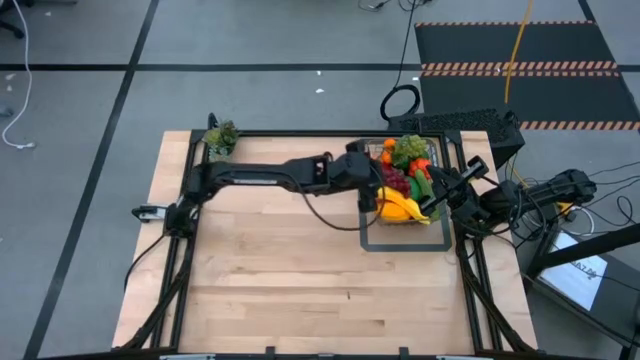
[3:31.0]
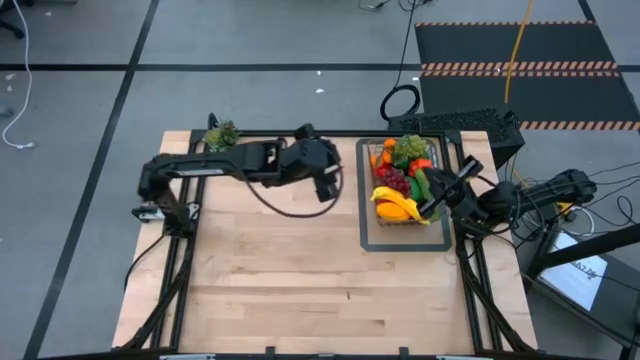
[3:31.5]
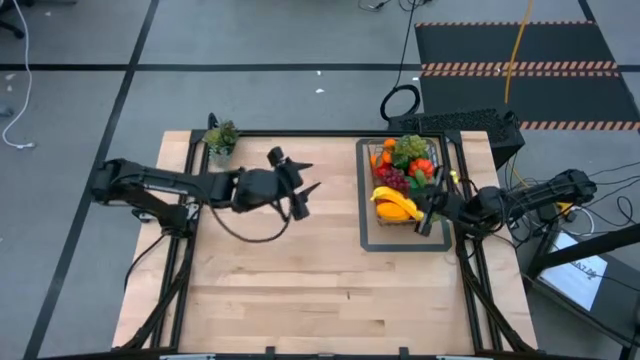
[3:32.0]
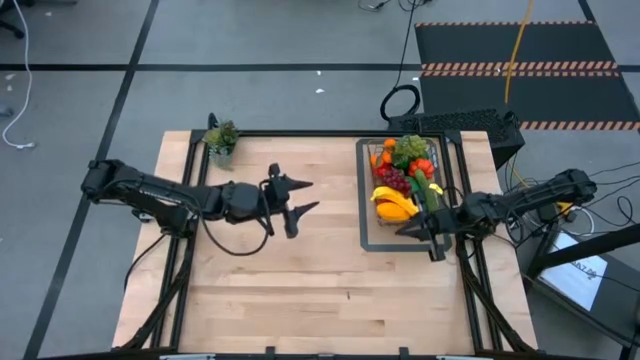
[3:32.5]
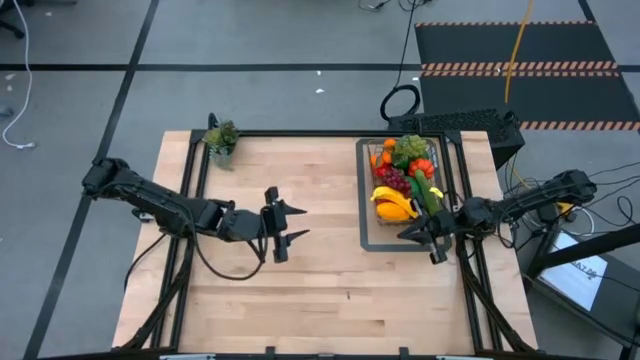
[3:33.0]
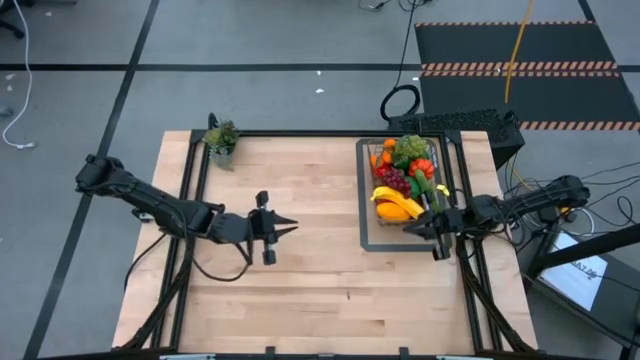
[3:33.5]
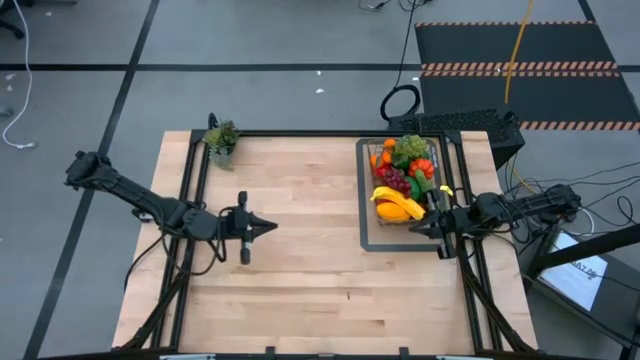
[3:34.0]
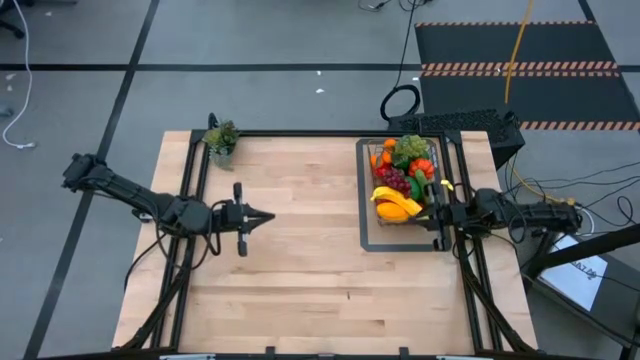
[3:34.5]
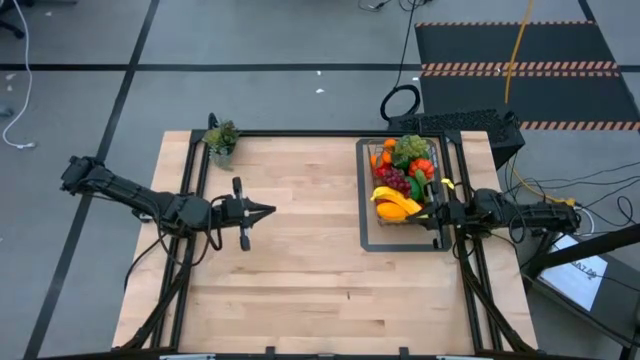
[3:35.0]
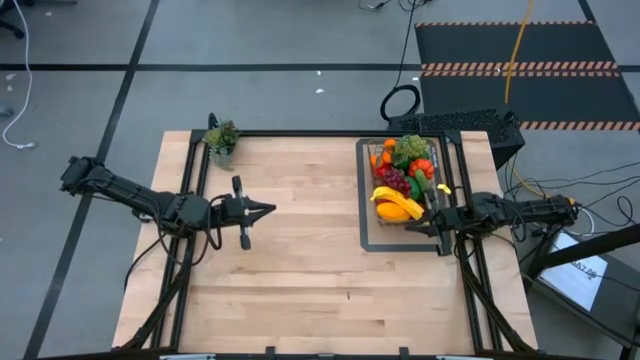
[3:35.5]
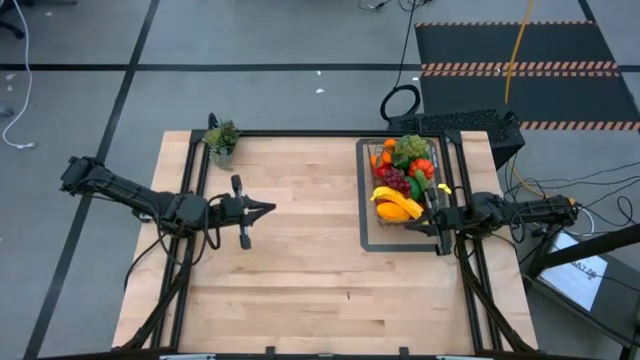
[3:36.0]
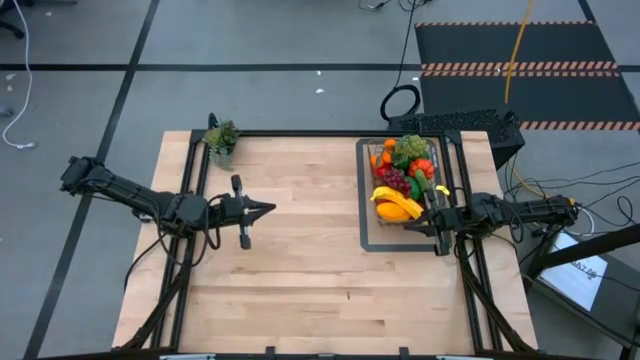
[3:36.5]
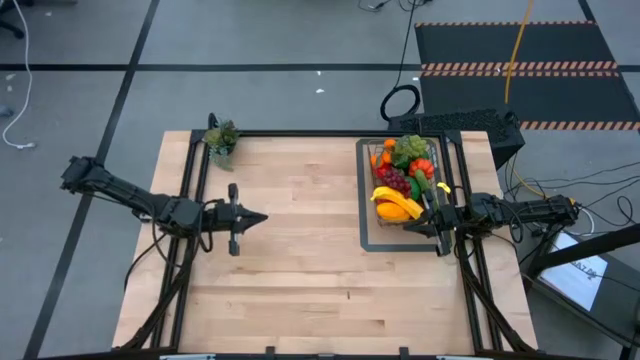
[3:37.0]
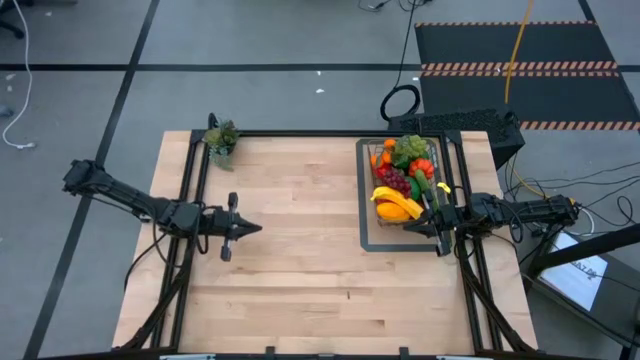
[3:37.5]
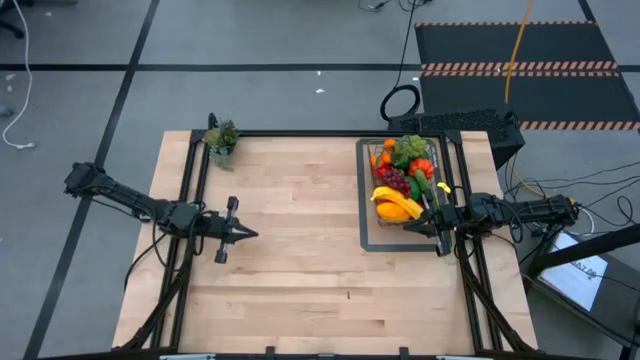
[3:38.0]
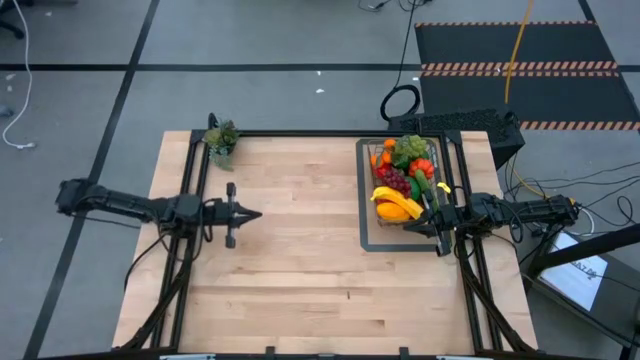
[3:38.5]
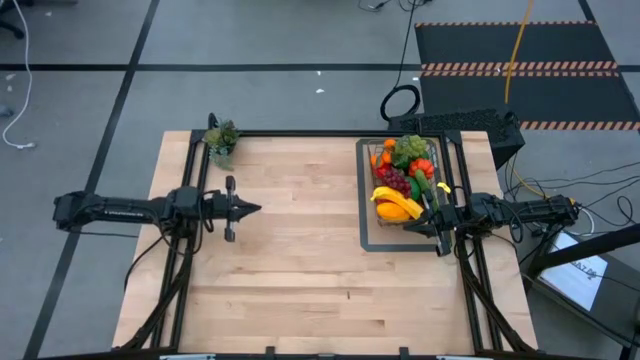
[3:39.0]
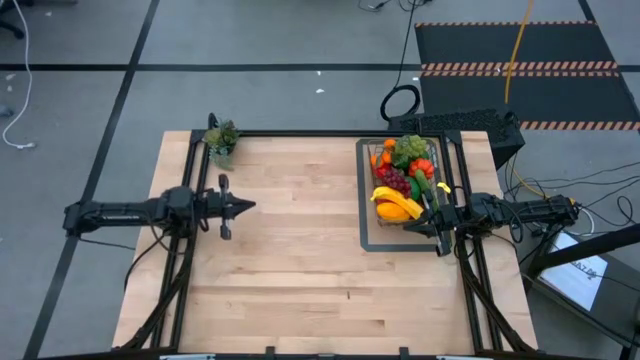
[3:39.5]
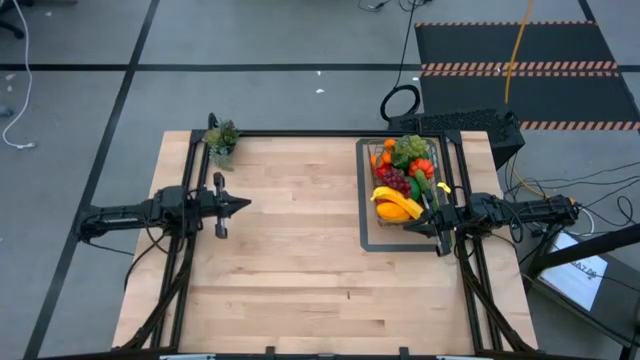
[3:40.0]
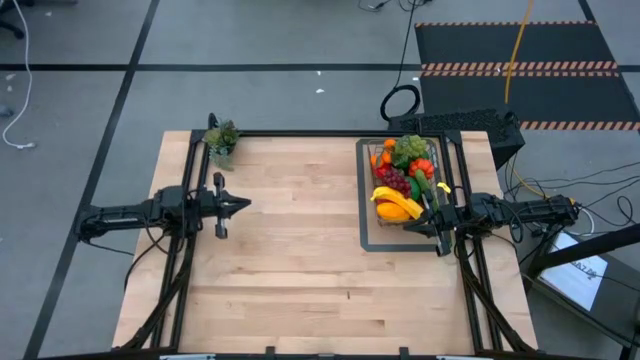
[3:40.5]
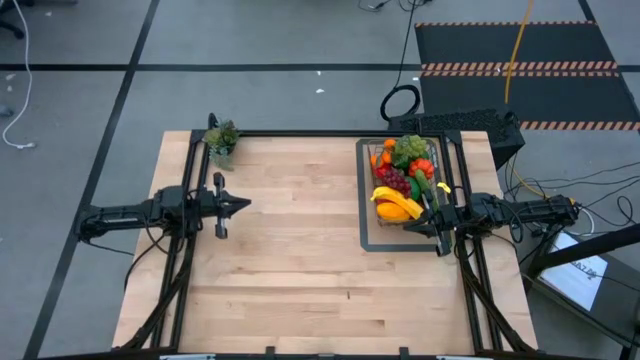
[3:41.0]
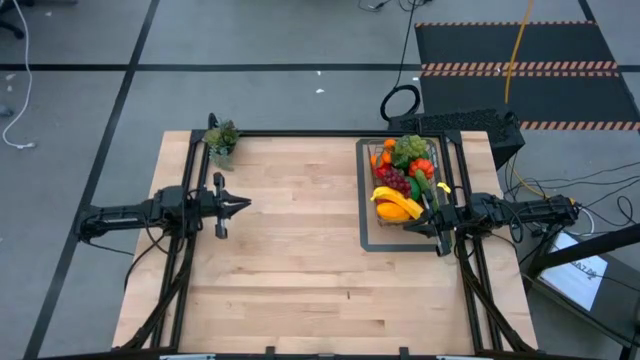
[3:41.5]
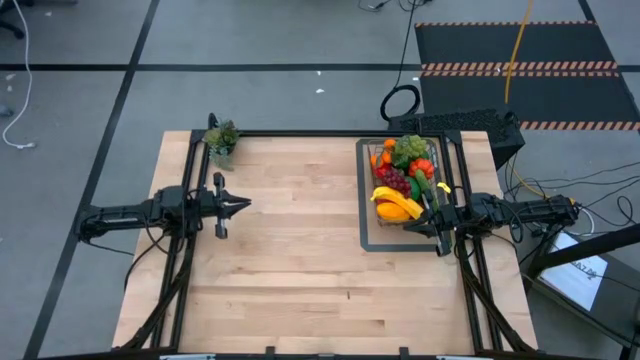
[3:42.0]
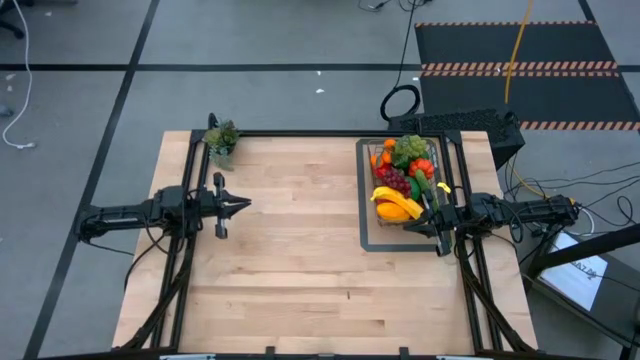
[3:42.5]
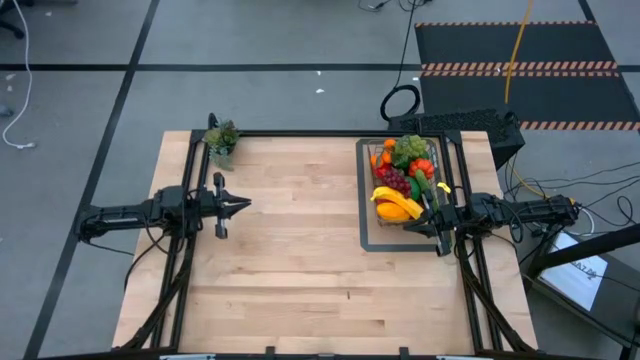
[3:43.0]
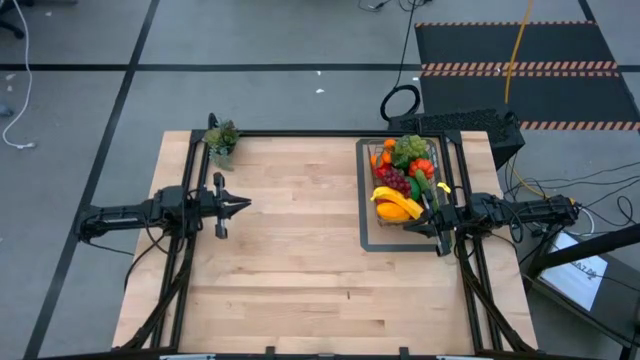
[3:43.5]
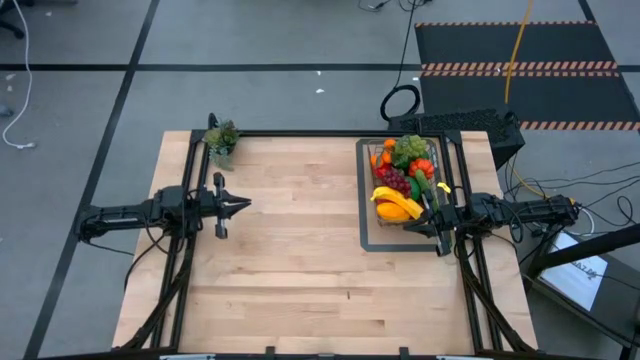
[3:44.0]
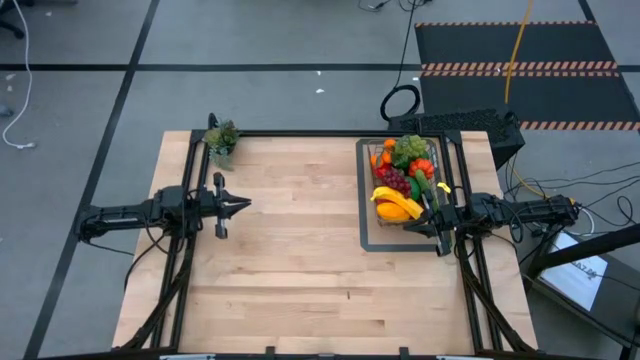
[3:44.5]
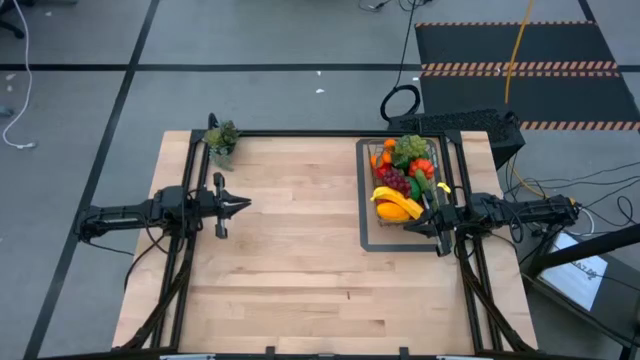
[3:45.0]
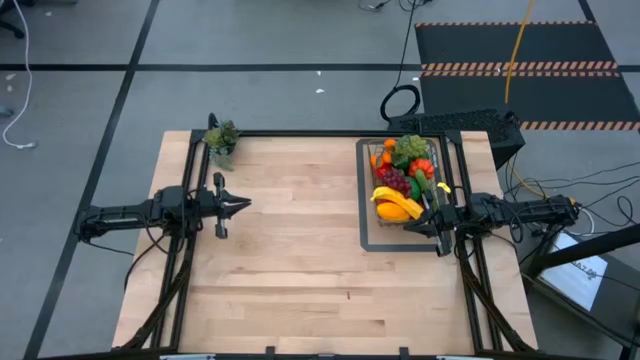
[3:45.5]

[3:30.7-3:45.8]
Task: Build produce basket
Return to Home Position

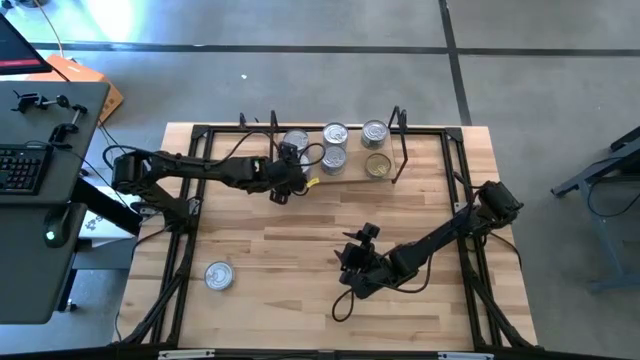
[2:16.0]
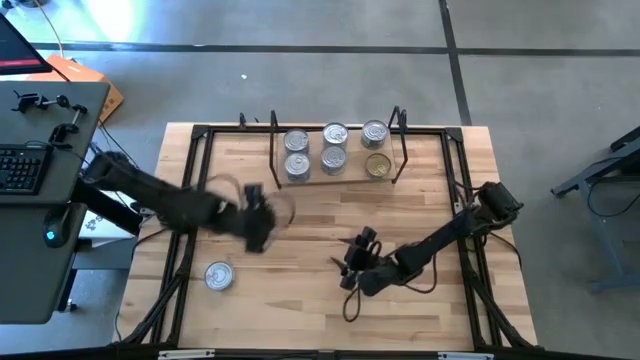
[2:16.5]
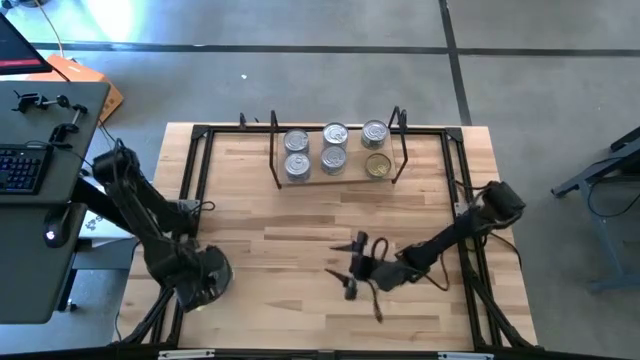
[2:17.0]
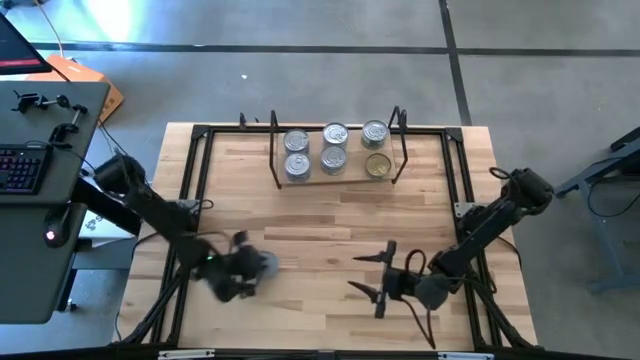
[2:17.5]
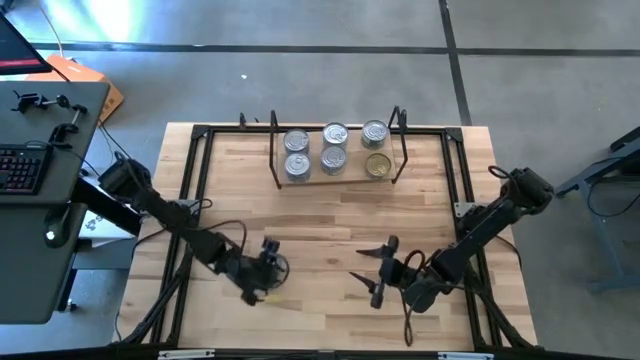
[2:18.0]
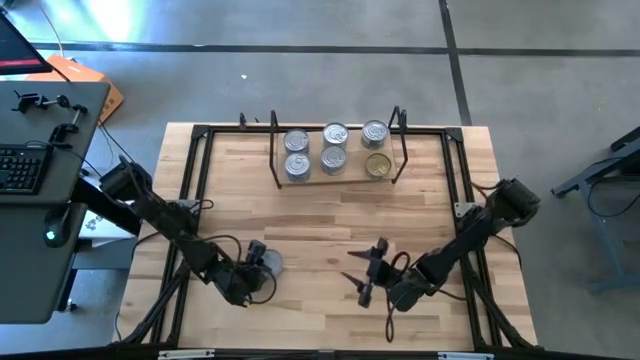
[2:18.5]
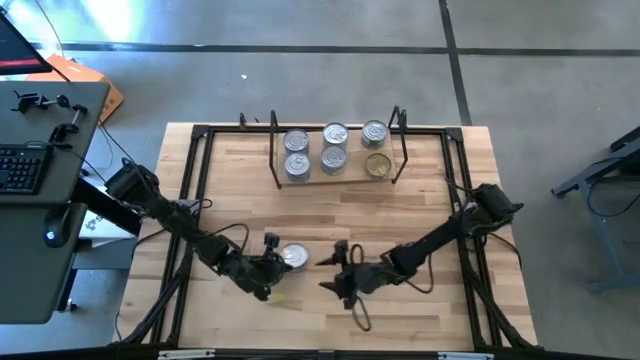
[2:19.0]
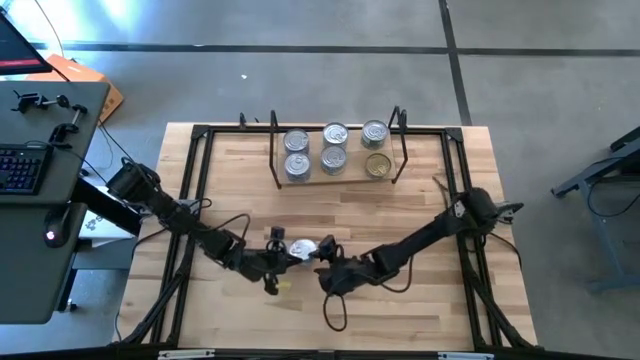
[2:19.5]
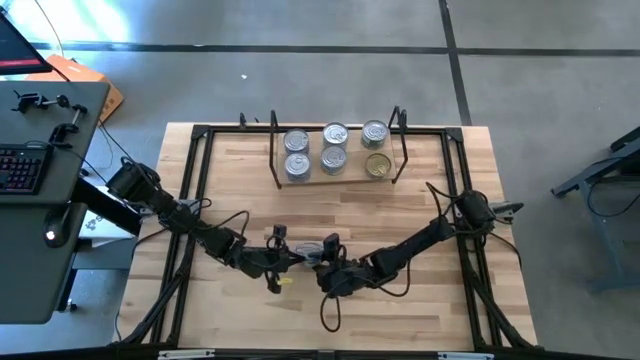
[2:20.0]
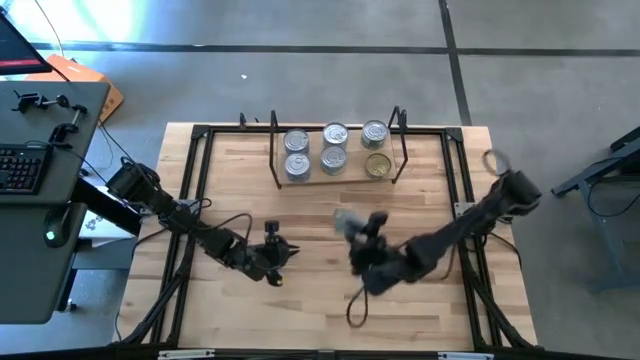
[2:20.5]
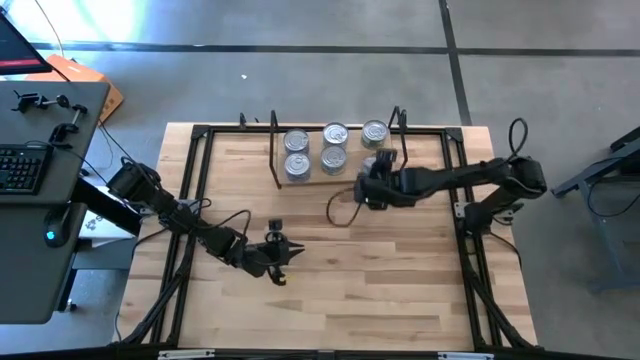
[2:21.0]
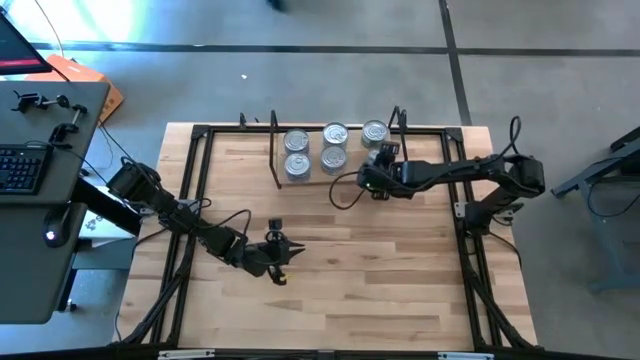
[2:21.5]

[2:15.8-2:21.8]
Task: Stack canned seafood by type on shelf
Stack the light green tuna can on top of the light green tuna can on the shelf
